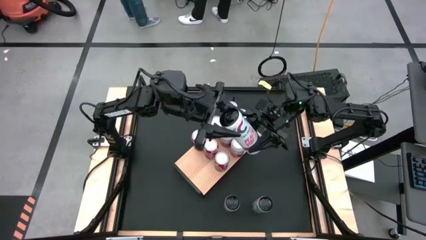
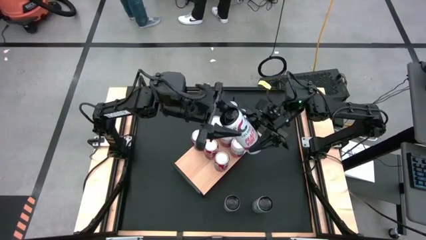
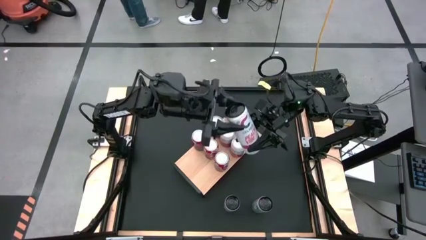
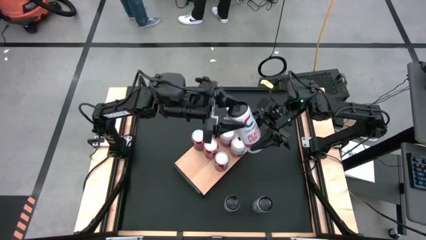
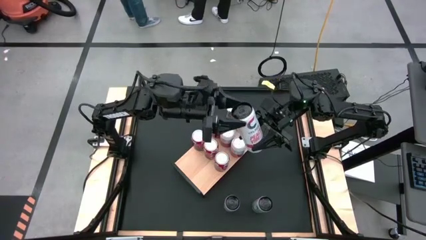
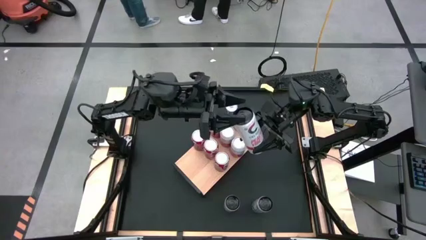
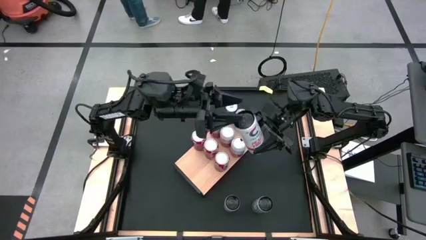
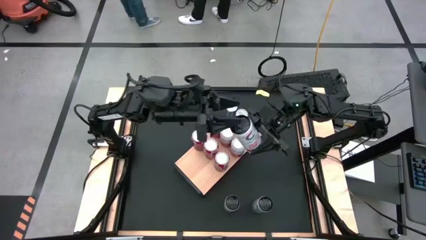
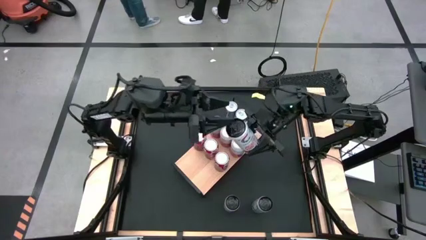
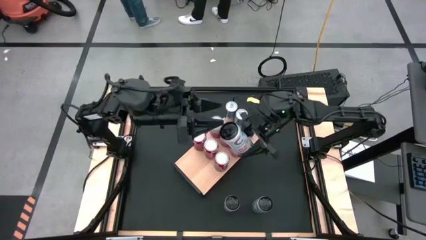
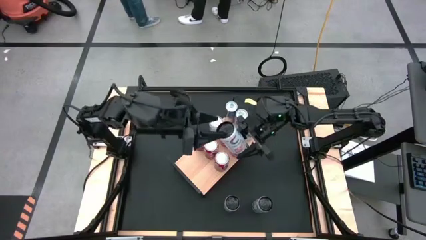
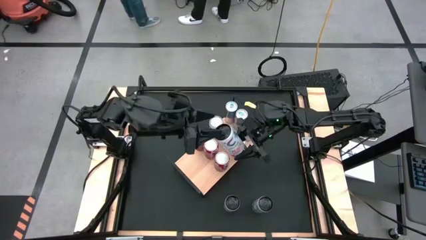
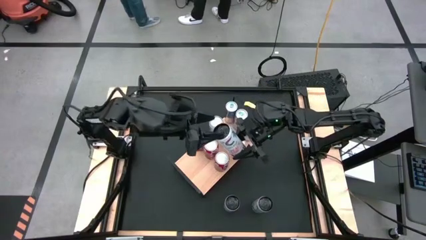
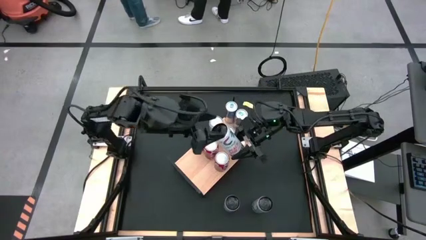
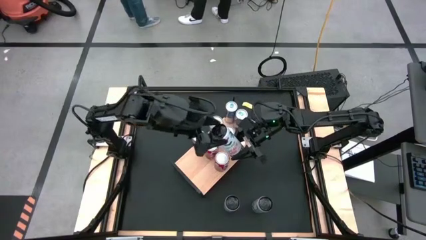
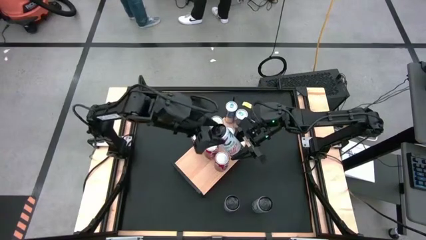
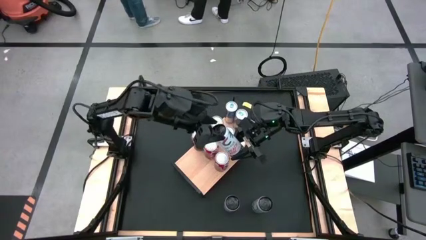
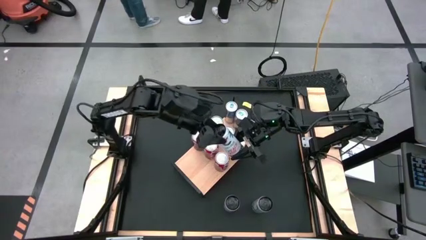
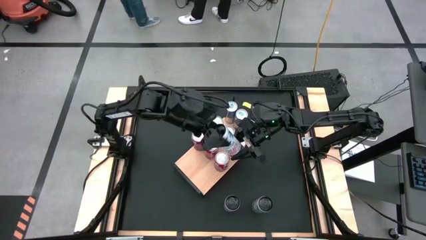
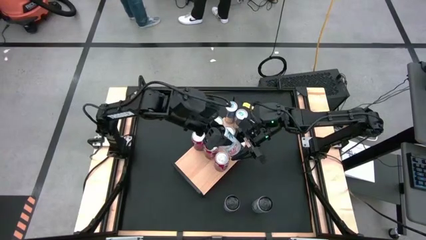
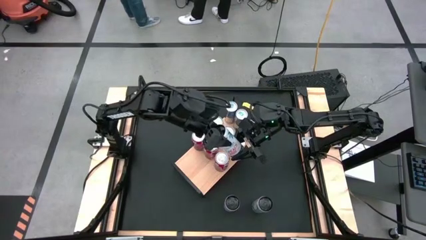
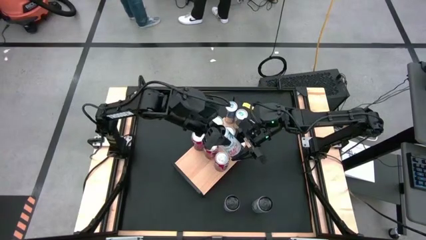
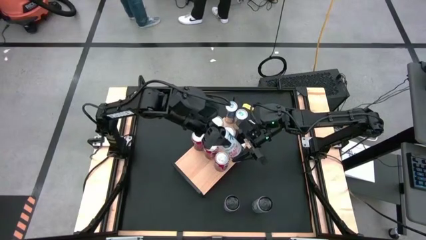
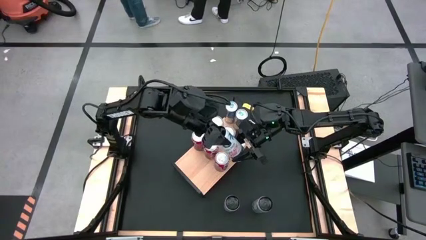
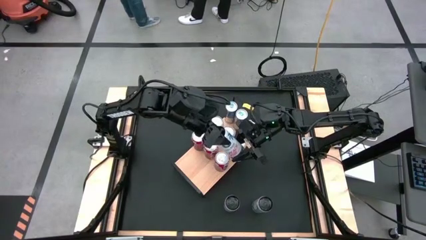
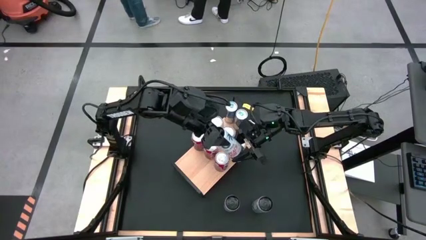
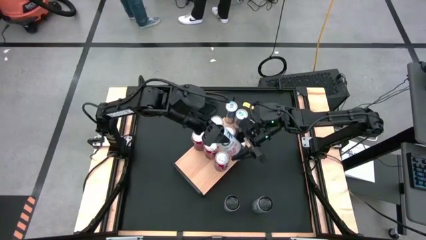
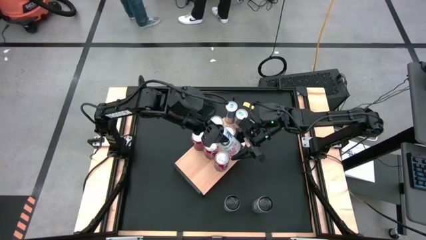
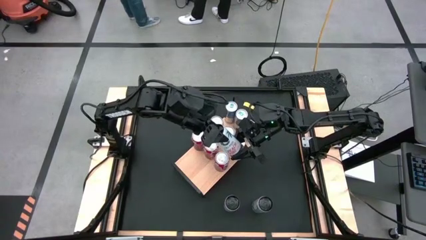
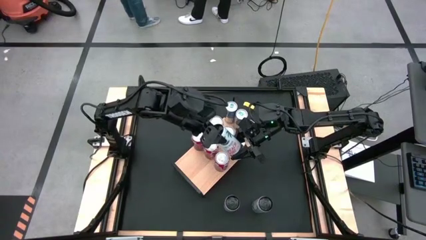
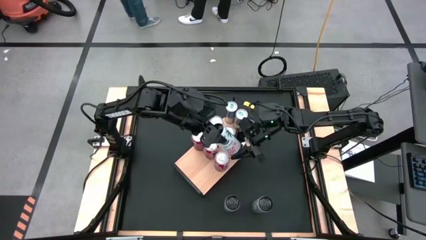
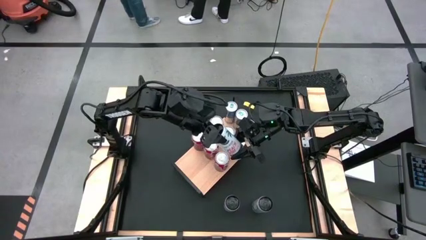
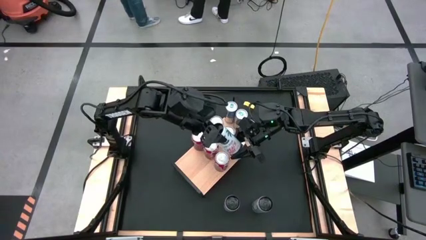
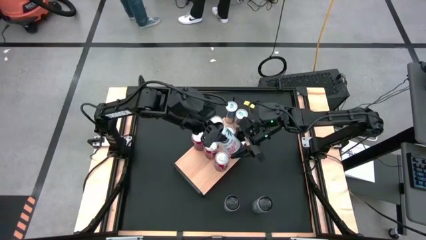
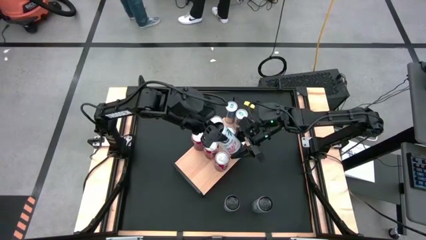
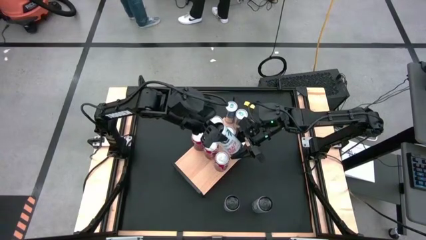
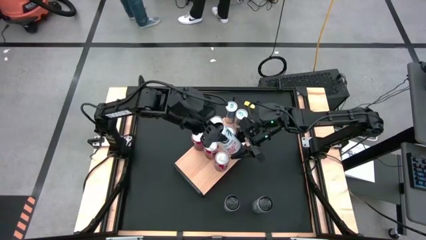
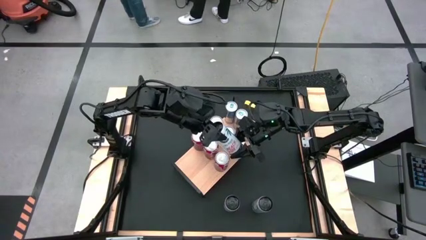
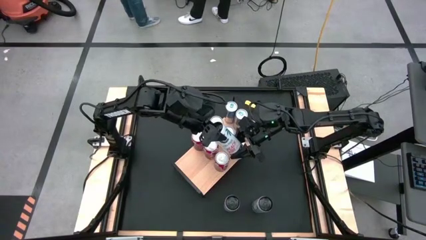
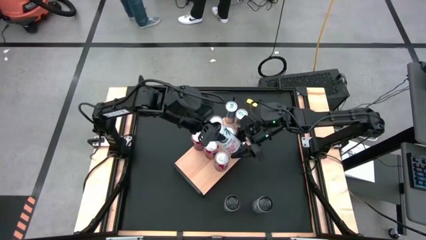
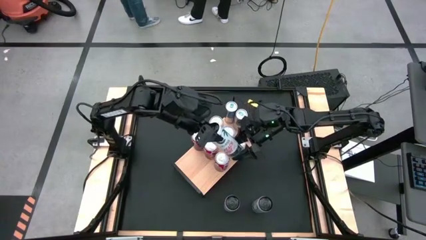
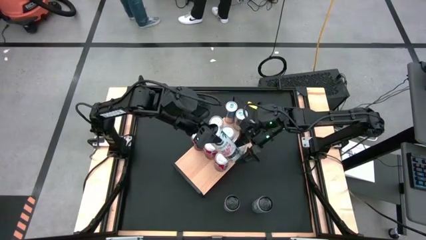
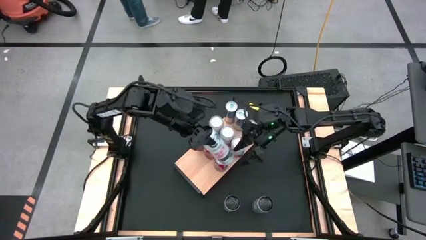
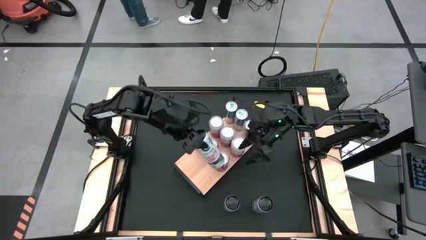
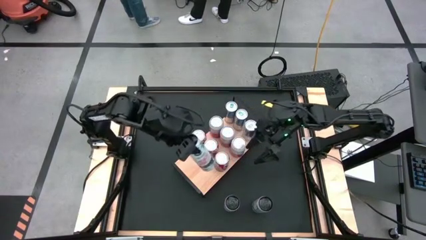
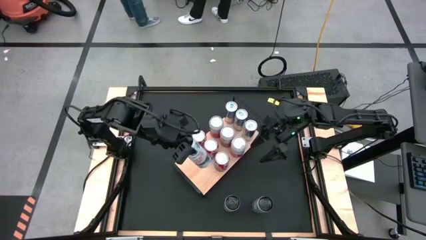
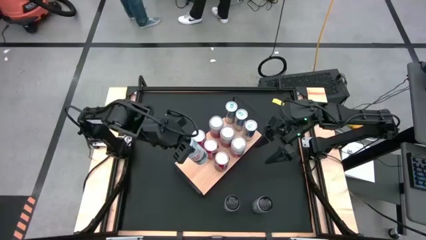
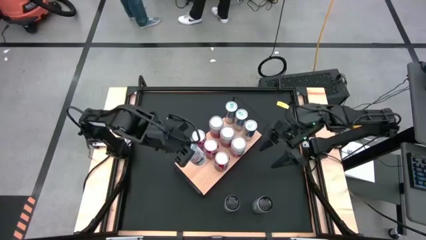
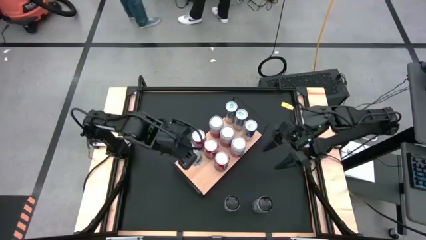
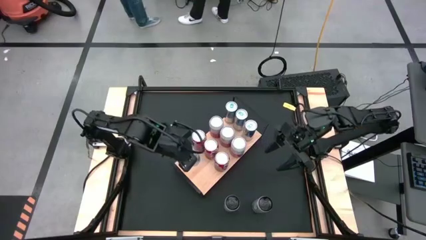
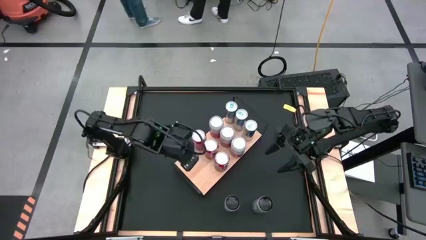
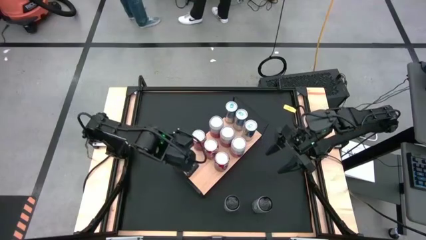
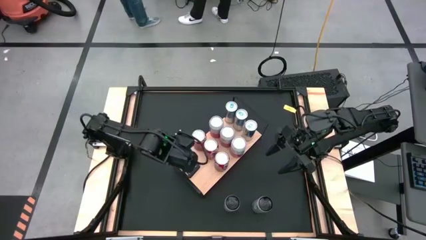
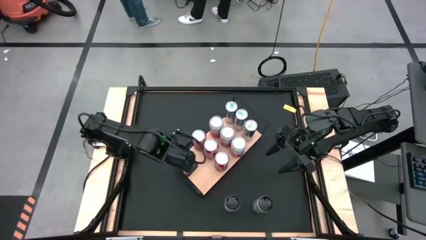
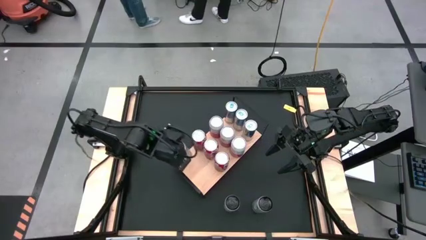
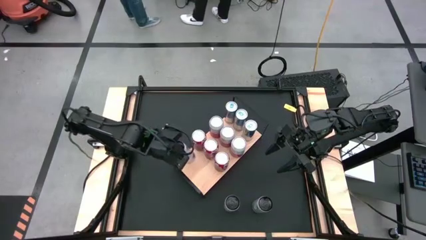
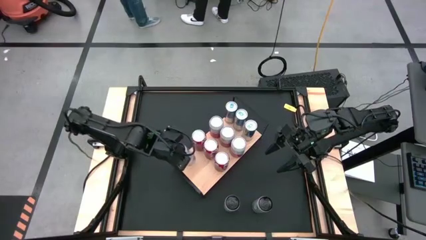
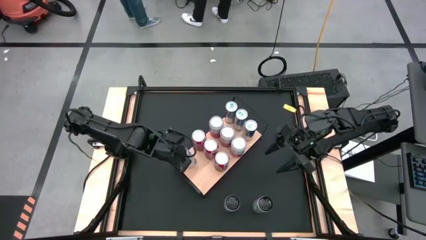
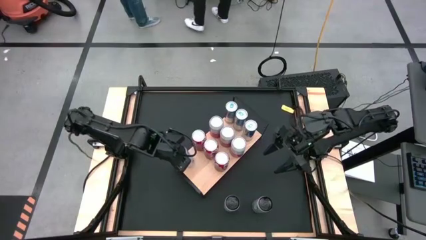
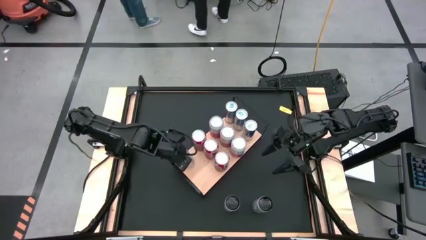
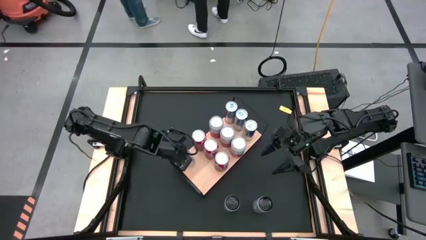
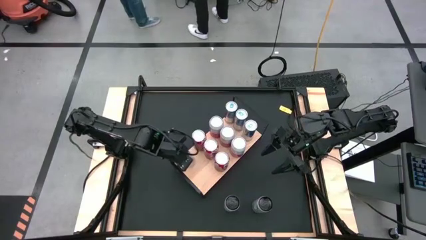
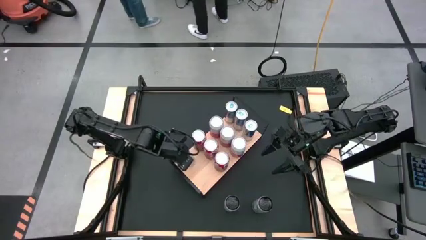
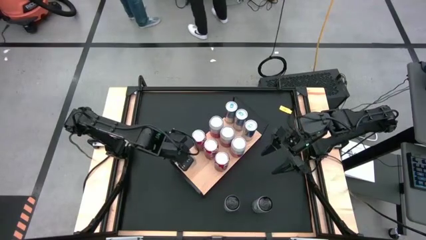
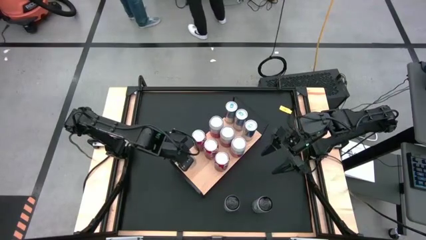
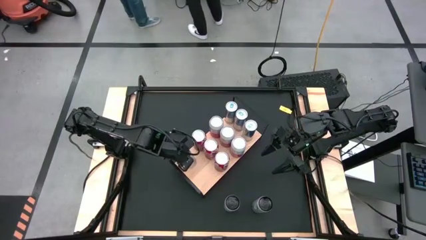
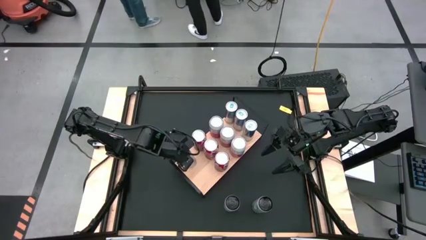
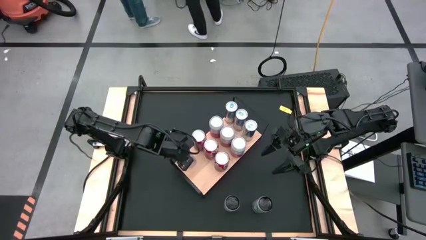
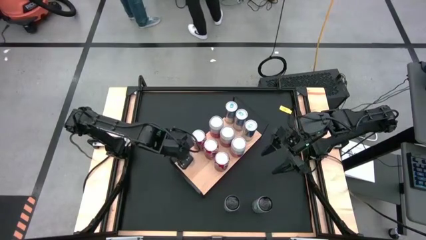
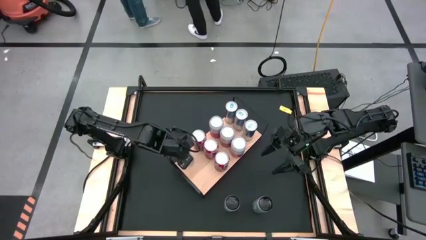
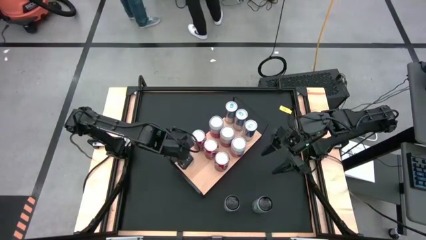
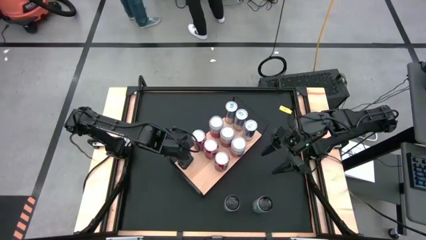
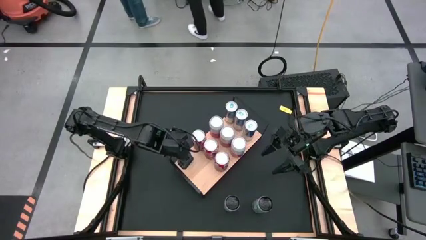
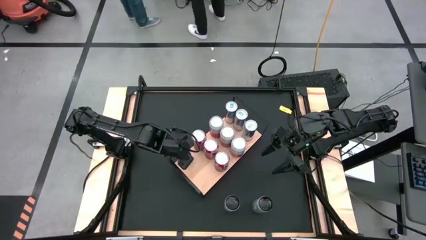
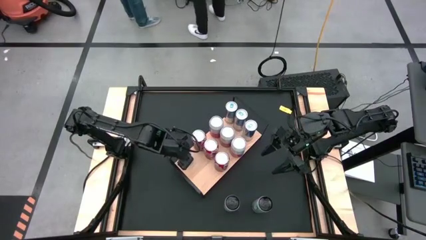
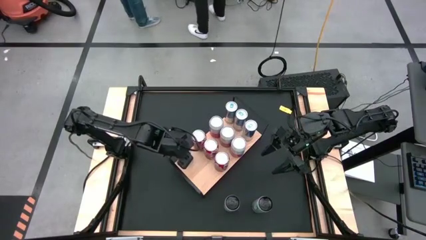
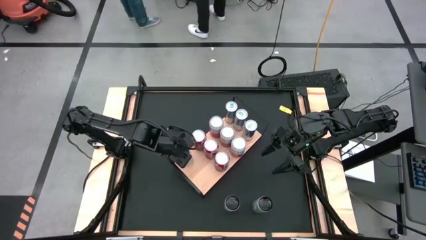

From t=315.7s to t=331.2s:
Task: Place canned beverage on shelf
Put the top left white pink soda can on the shelf
